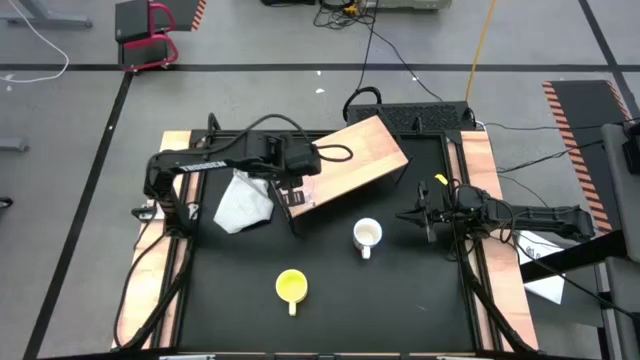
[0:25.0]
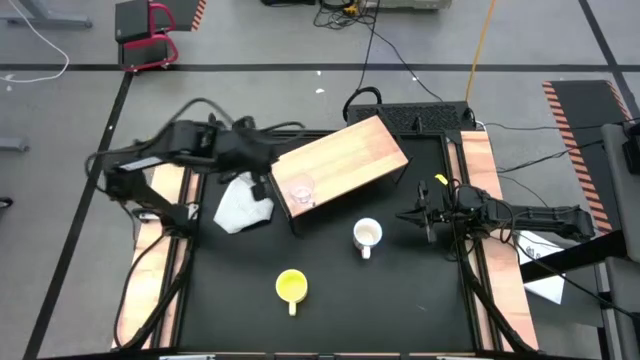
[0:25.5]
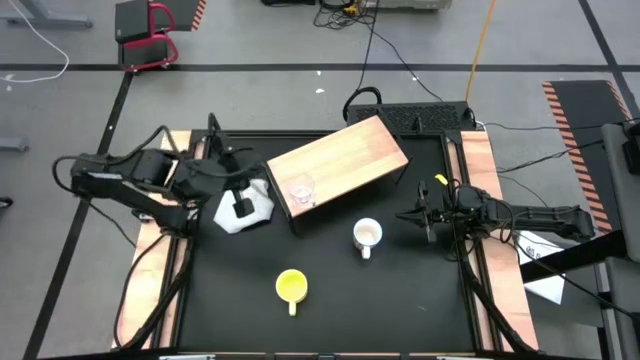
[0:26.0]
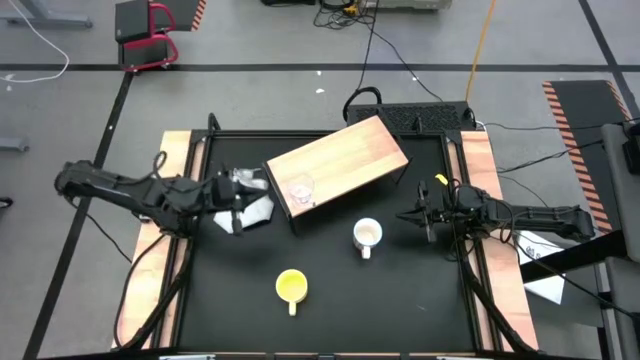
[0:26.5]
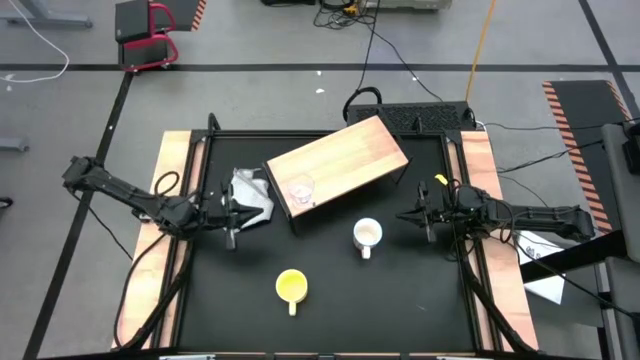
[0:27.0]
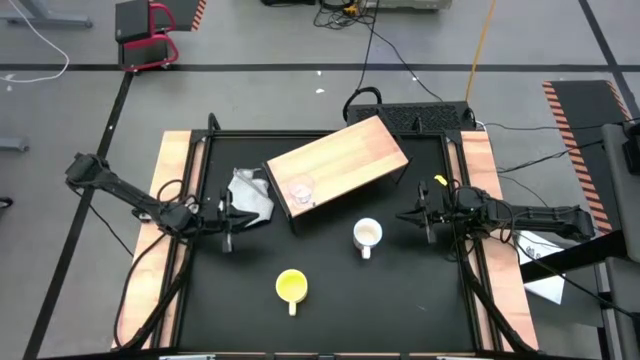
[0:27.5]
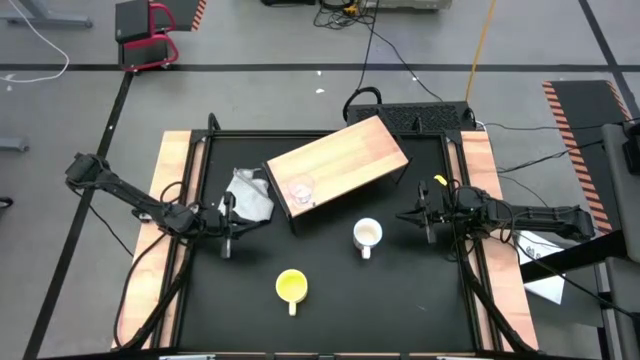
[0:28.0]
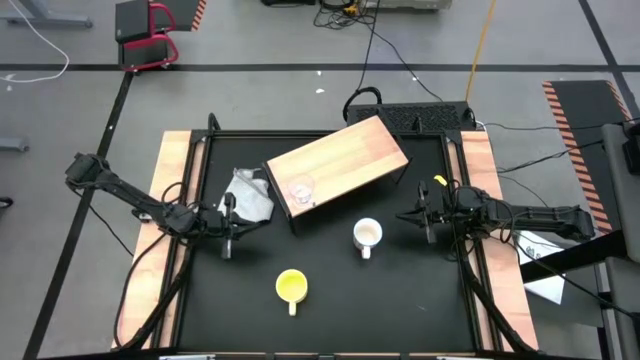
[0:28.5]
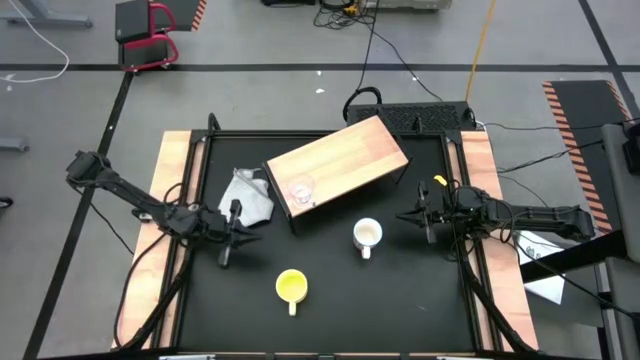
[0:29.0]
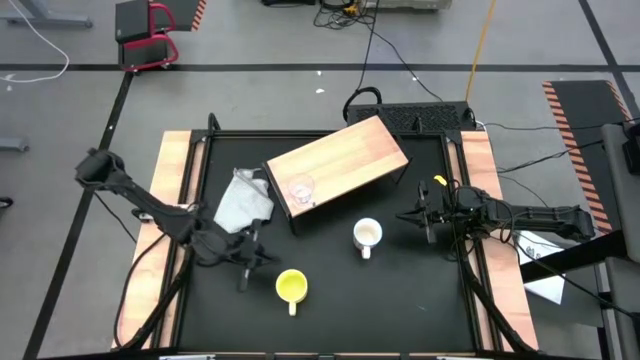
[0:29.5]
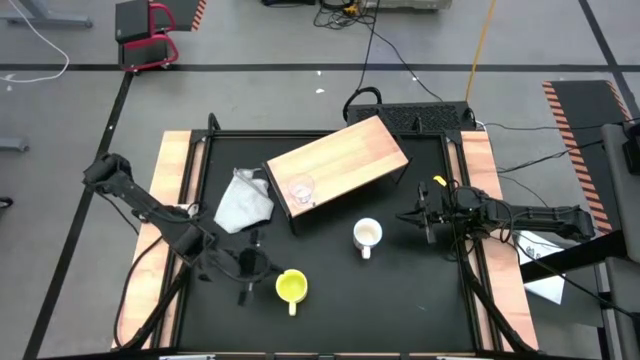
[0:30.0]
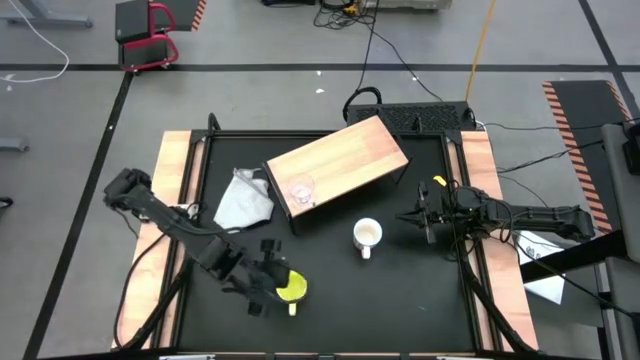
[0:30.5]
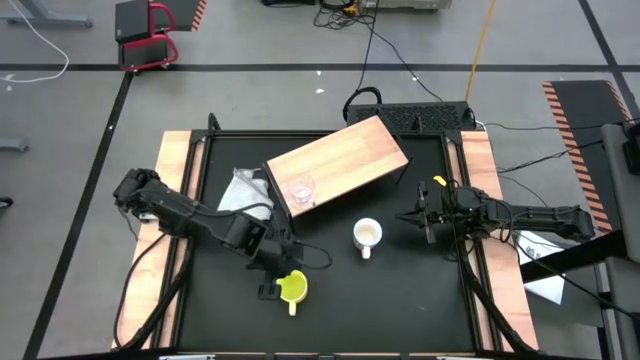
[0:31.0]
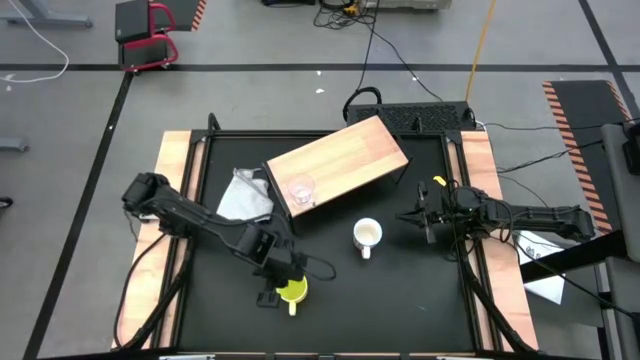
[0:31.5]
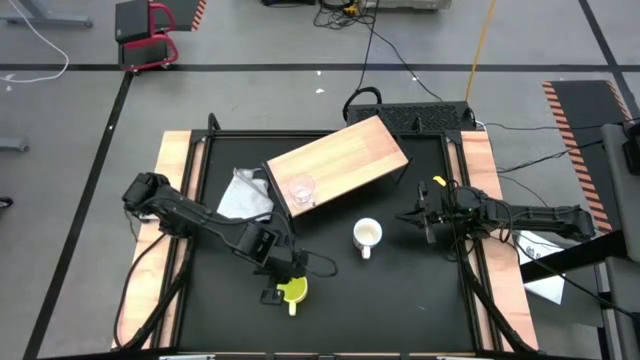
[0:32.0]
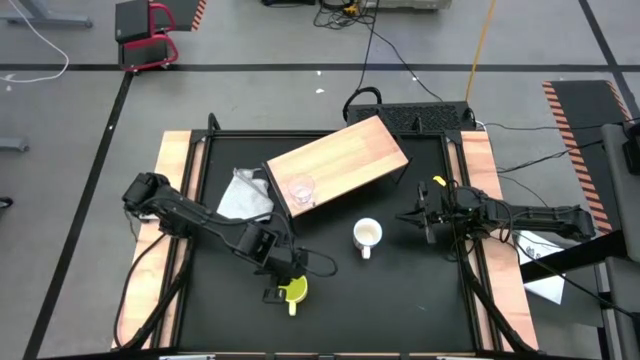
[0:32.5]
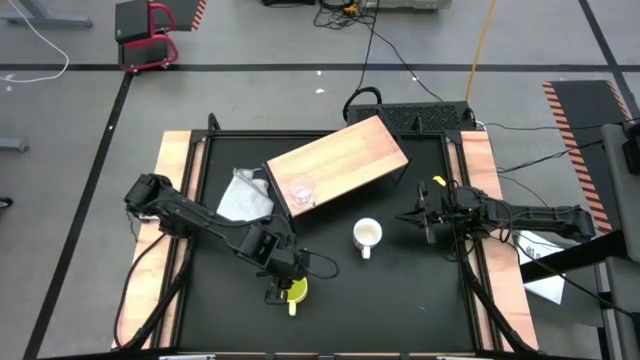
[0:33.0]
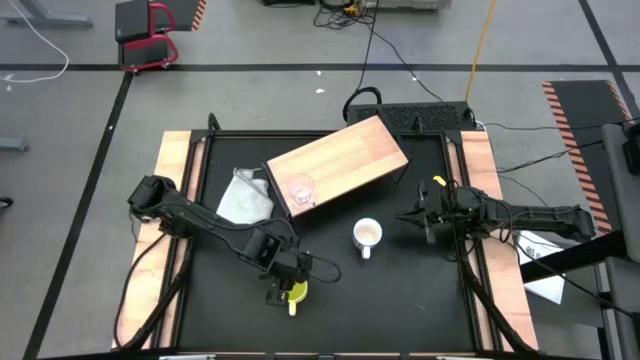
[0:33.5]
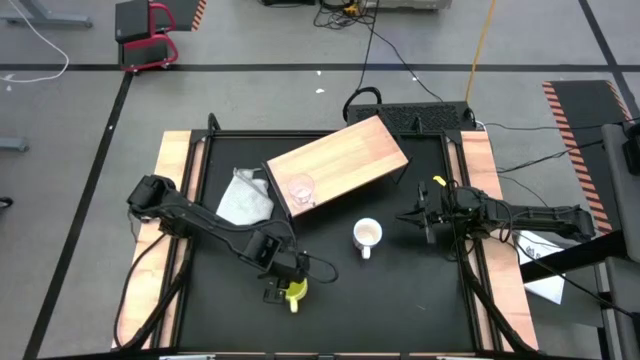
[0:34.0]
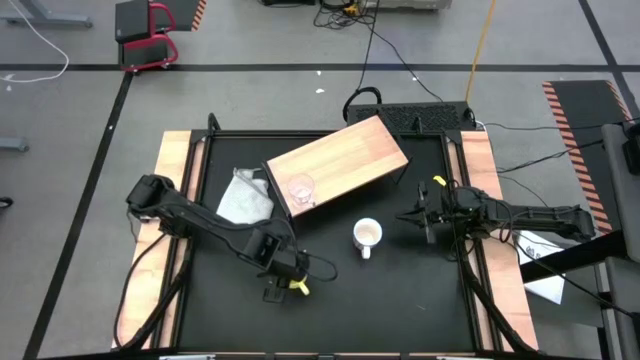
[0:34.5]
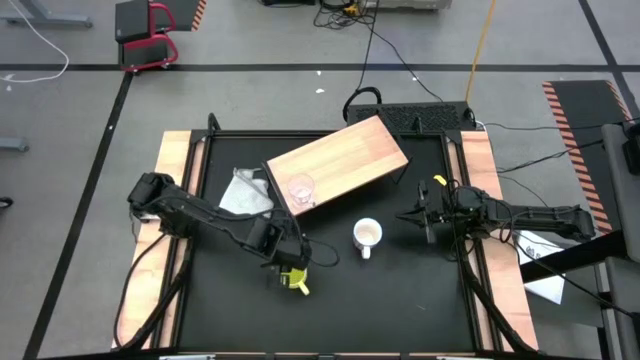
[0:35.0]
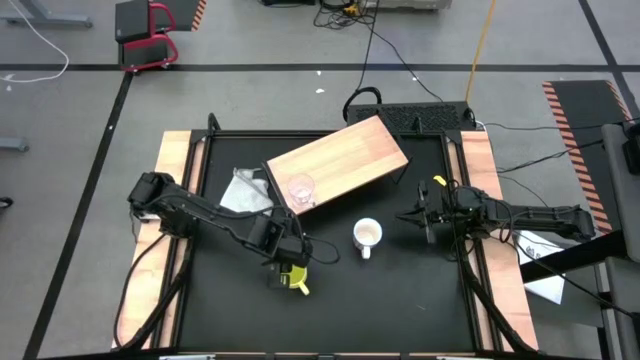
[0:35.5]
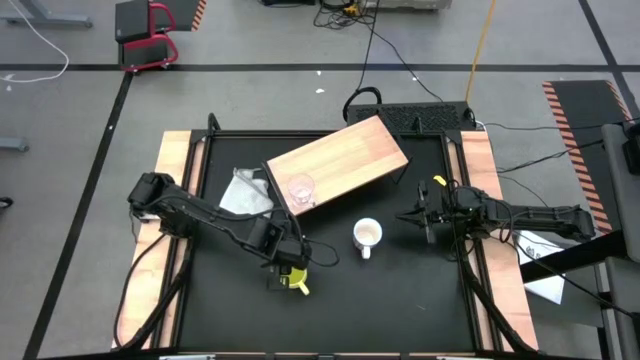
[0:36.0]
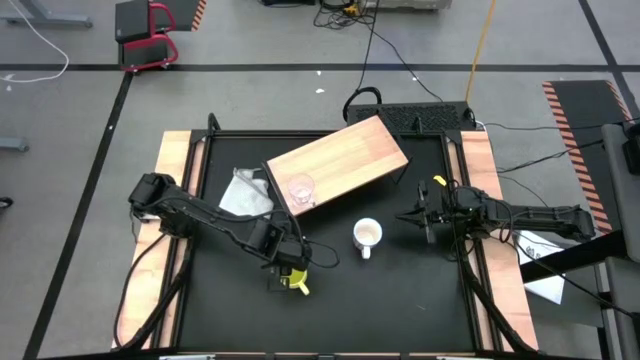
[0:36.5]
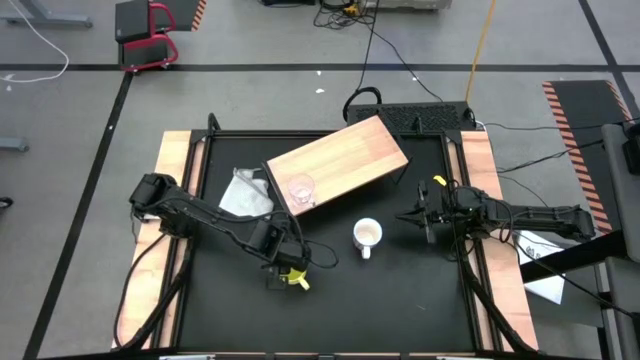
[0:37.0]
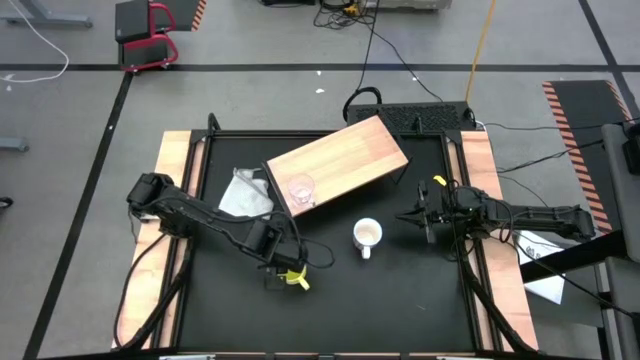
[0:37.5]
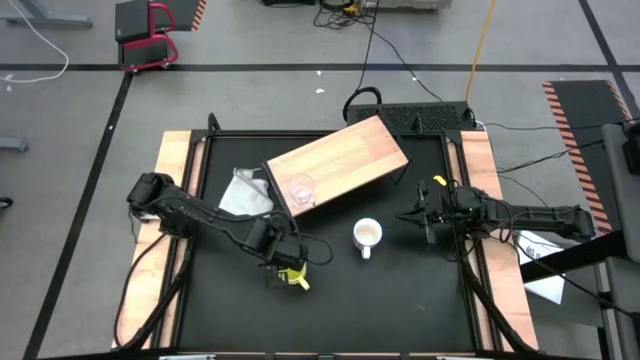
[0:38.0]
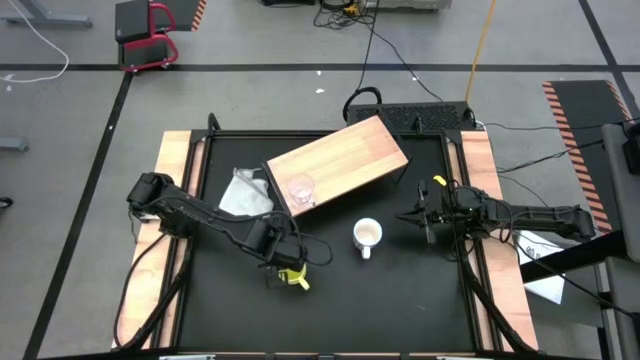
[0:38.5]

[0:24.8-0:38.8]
Task: Stack small to large cups/mugs on shelf
Put the yellow mug on the shelf

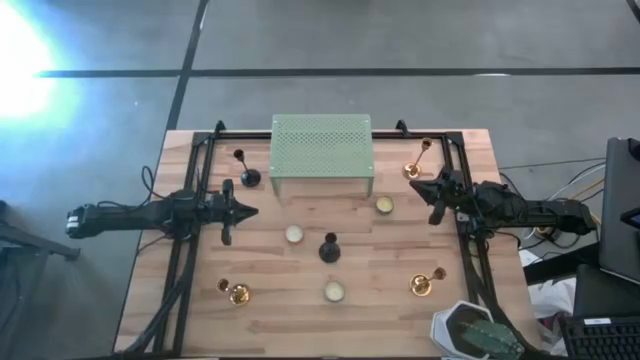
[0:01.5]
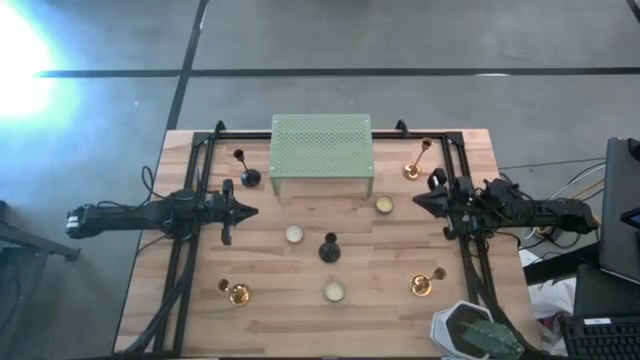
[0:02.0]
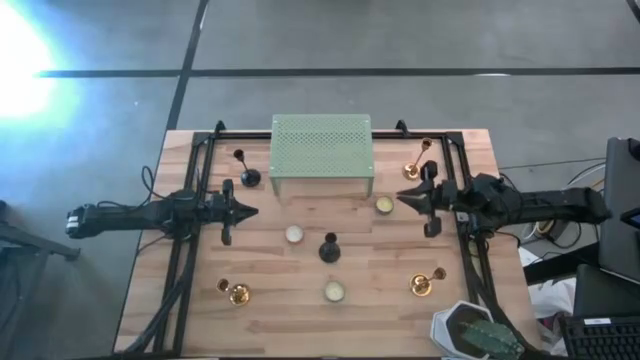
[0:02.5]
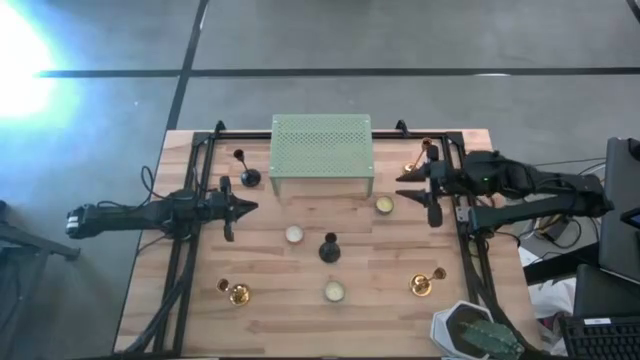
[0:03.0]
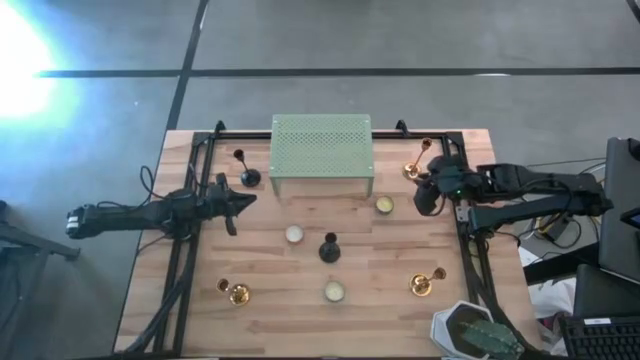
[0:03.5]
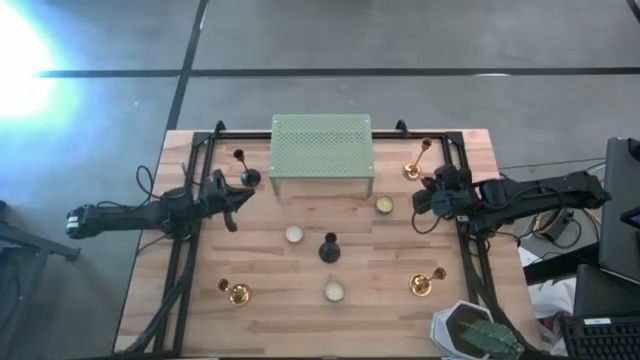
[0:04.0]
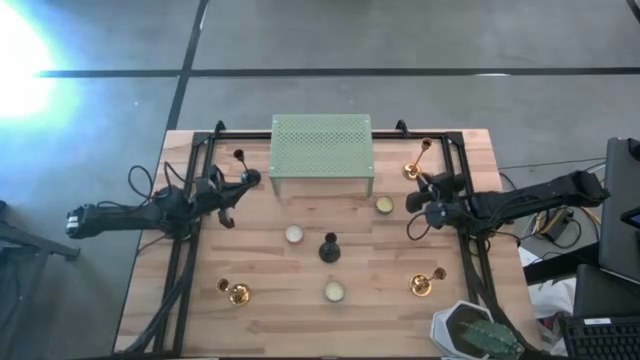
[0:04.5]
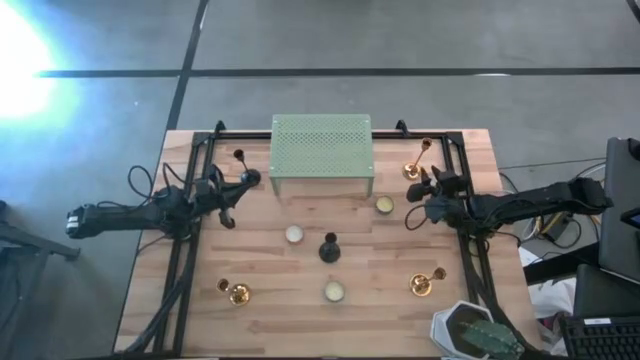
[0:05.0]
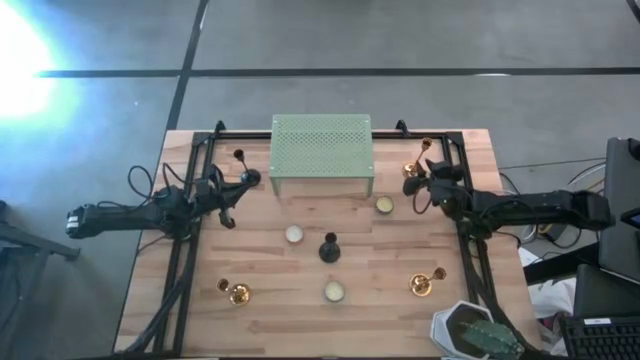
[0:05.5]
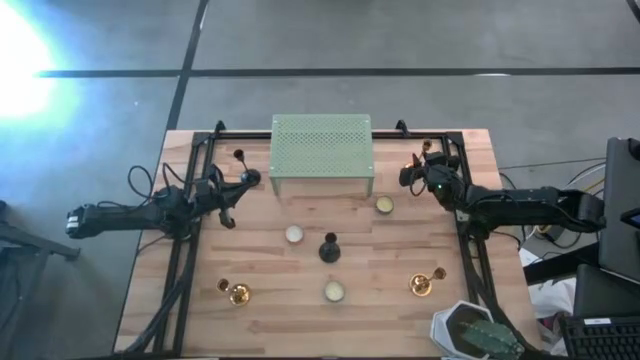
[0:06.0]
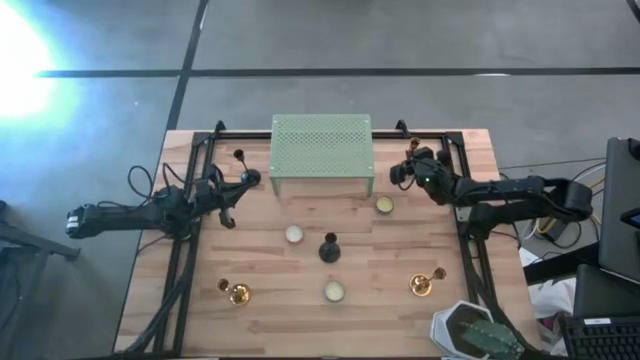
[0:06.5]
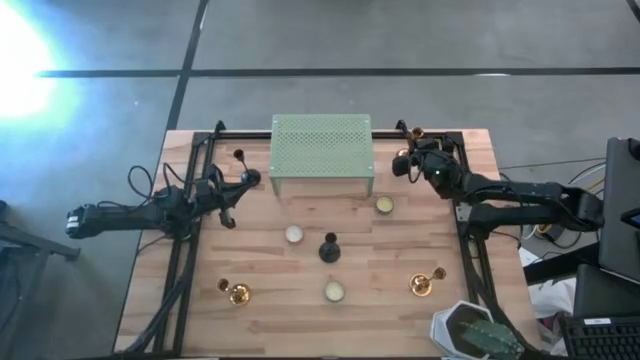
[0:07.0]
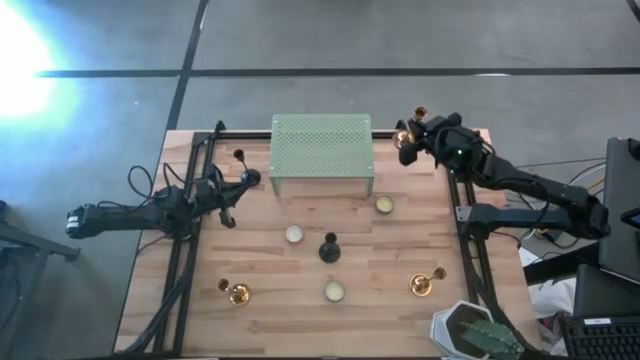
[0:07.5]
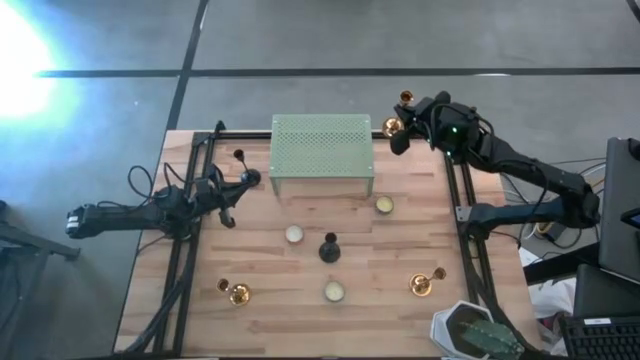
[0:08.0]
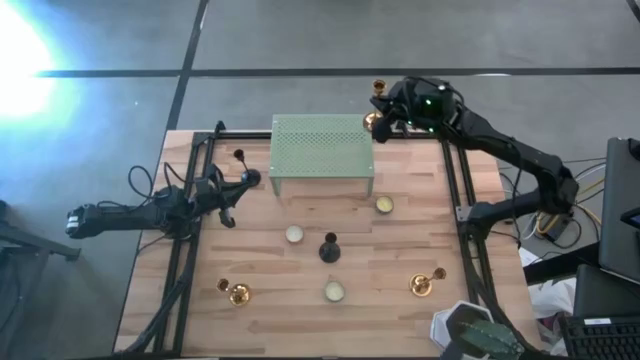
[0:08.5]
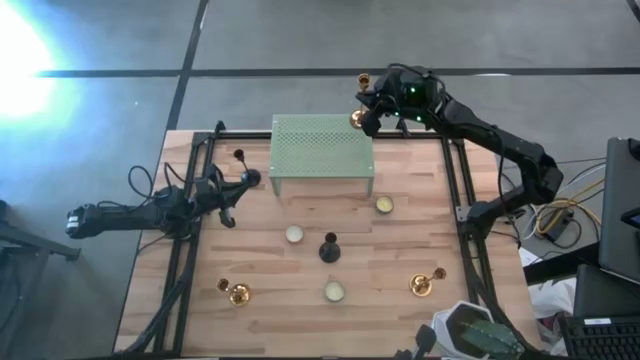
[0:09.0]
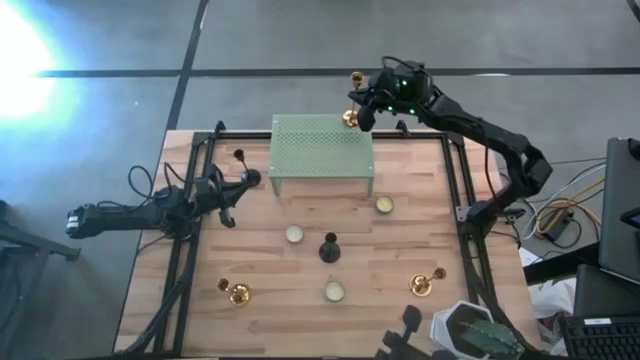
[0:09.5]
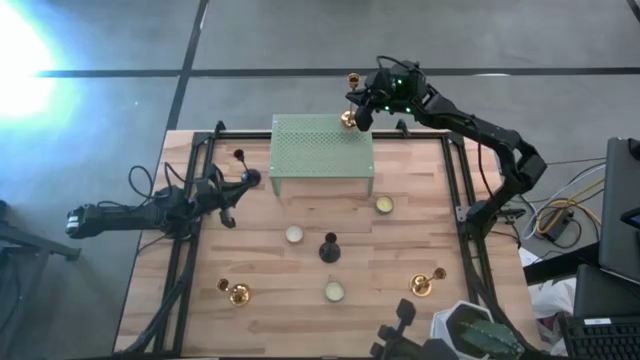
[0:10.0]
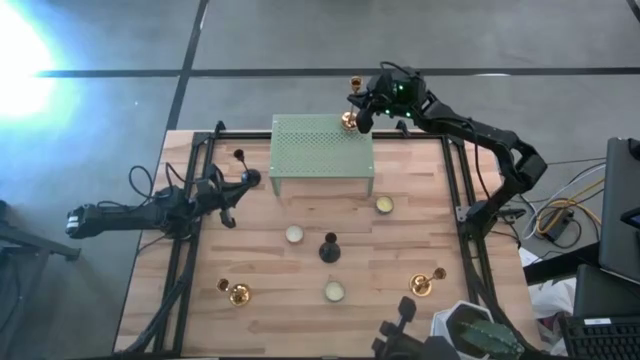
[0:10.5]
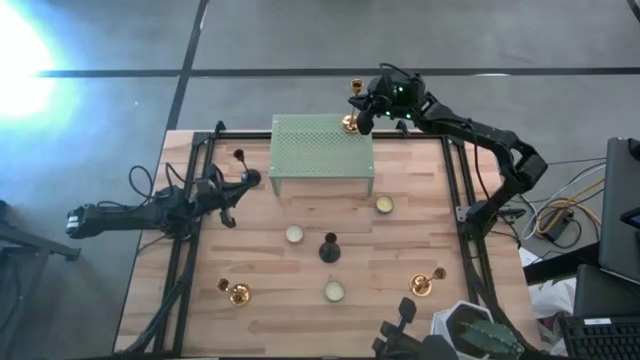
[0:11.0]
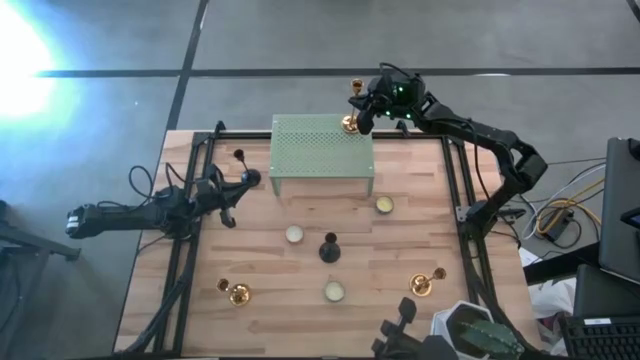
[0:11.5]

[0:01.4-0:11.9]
Task: Pick & Place candle stick holders
Put the top gold candle holder onto the shelf
